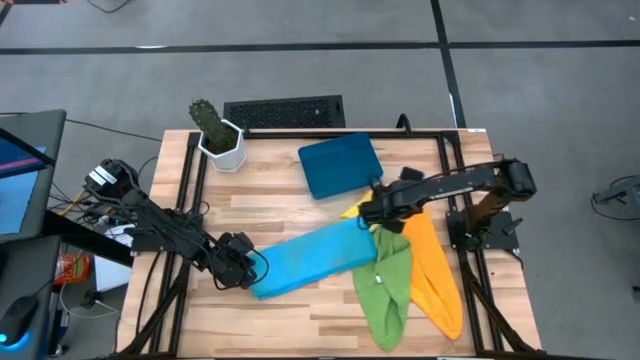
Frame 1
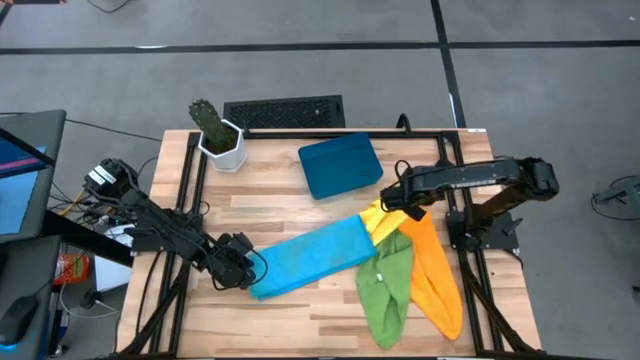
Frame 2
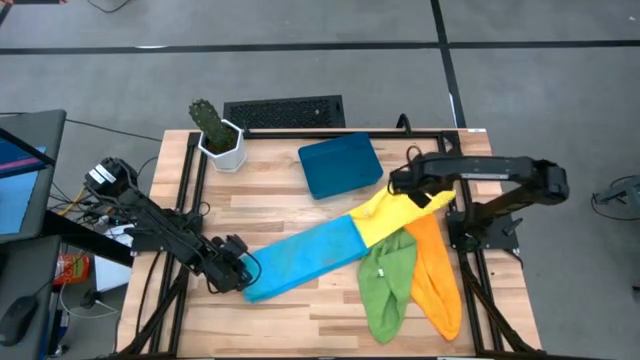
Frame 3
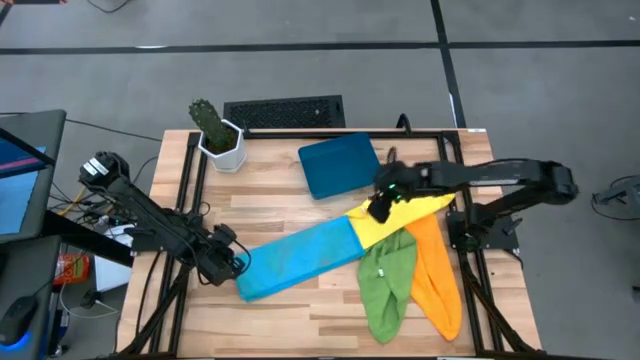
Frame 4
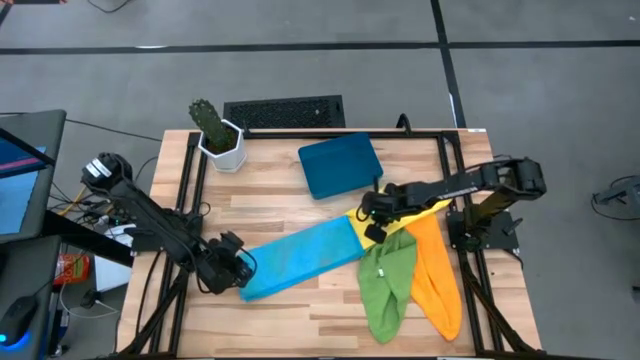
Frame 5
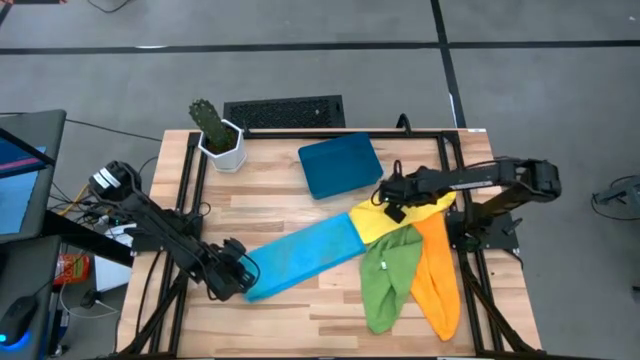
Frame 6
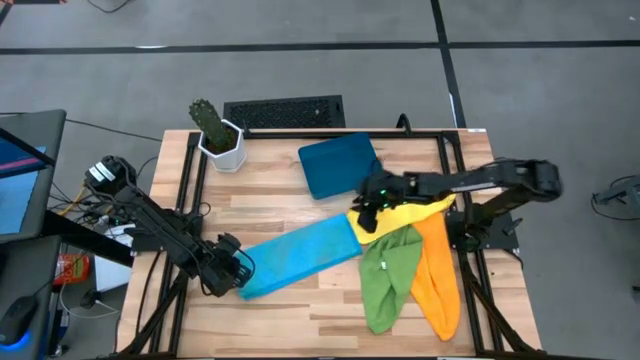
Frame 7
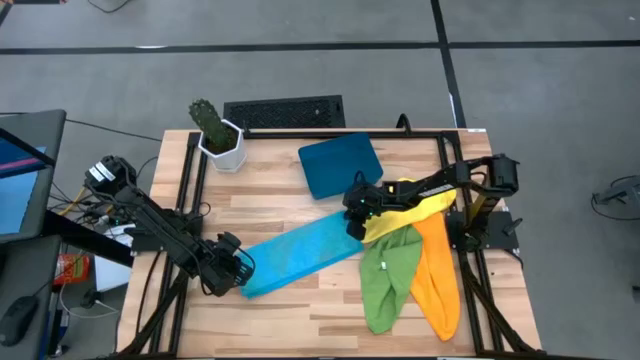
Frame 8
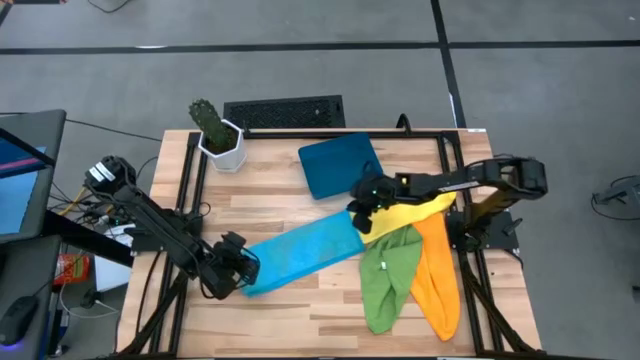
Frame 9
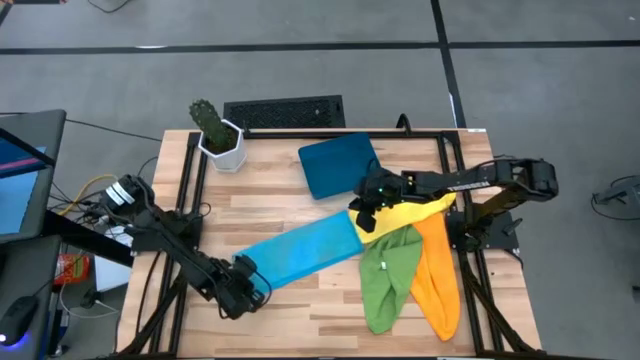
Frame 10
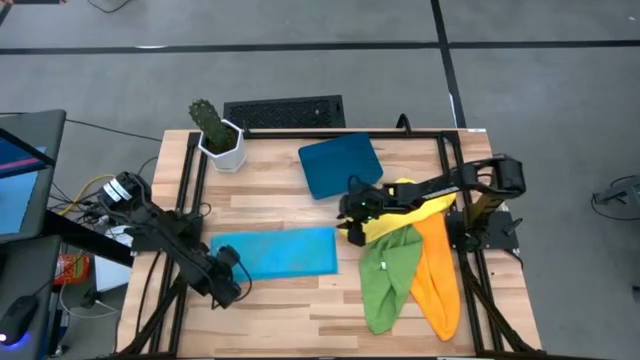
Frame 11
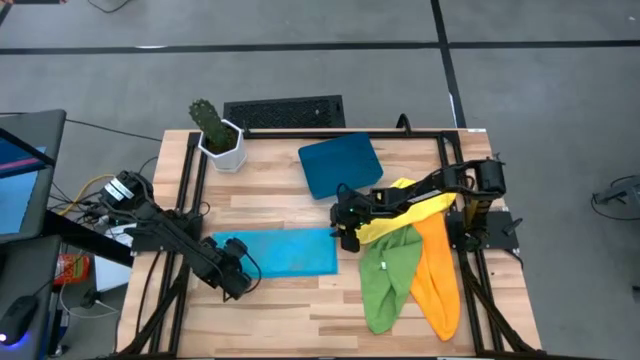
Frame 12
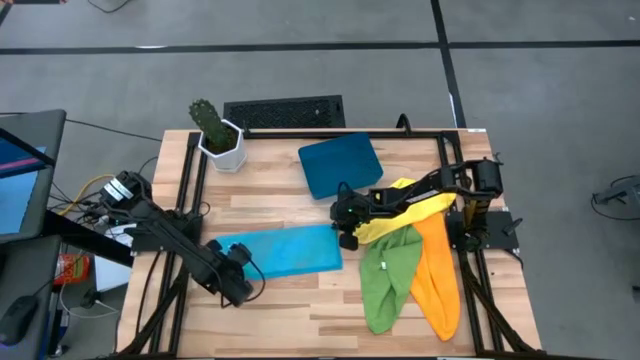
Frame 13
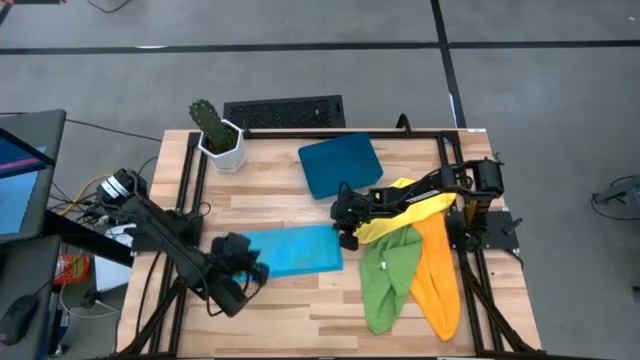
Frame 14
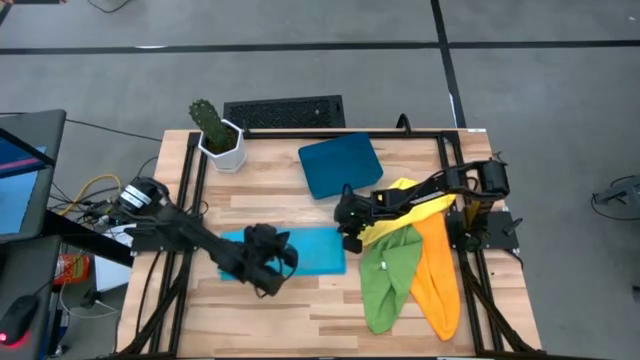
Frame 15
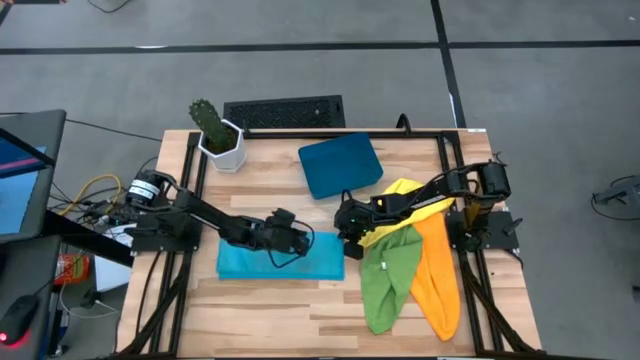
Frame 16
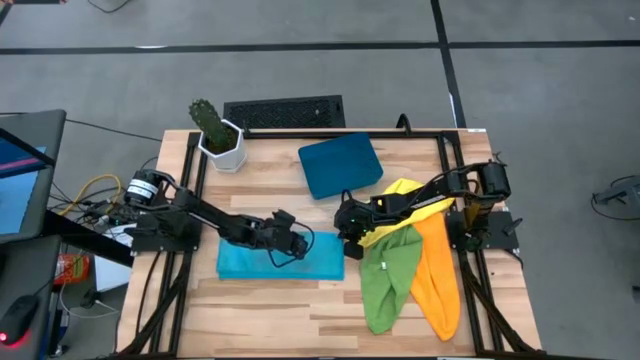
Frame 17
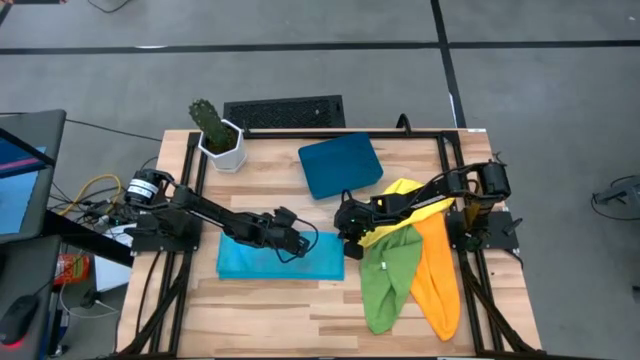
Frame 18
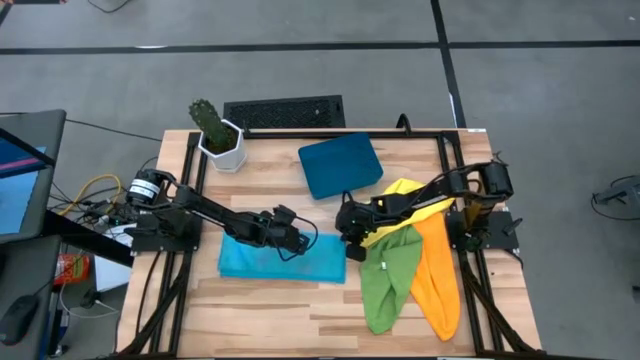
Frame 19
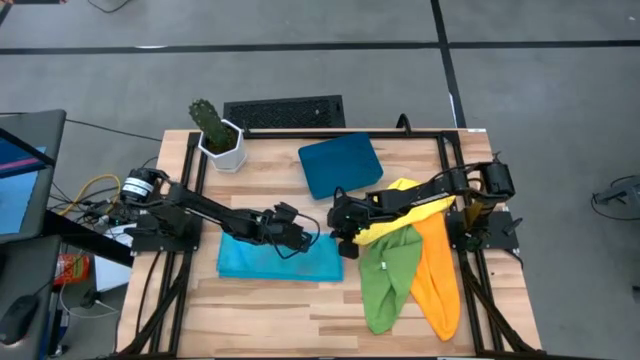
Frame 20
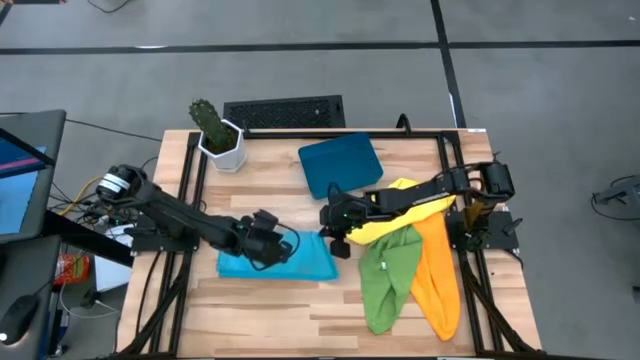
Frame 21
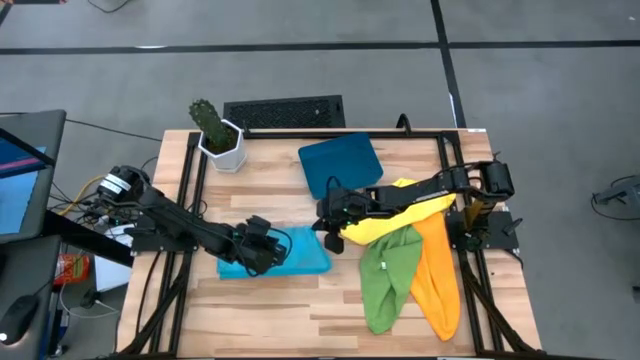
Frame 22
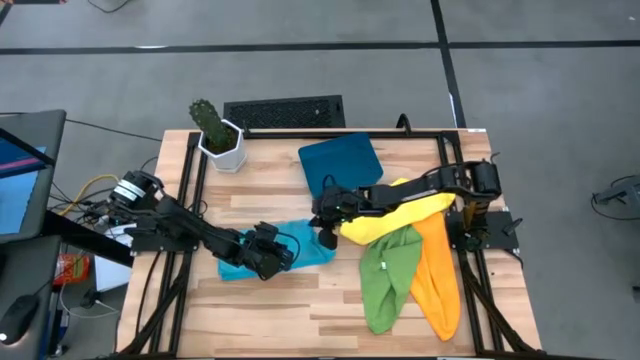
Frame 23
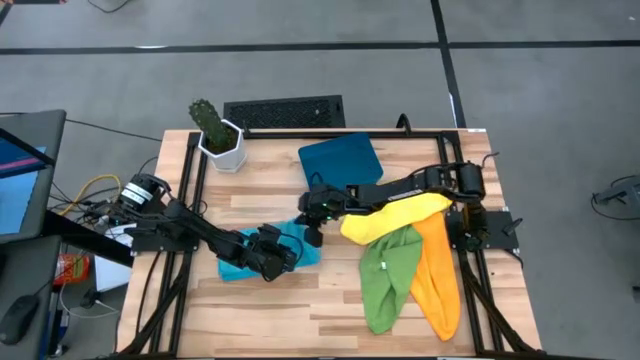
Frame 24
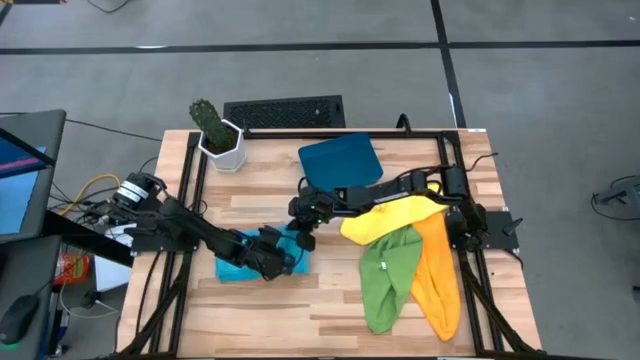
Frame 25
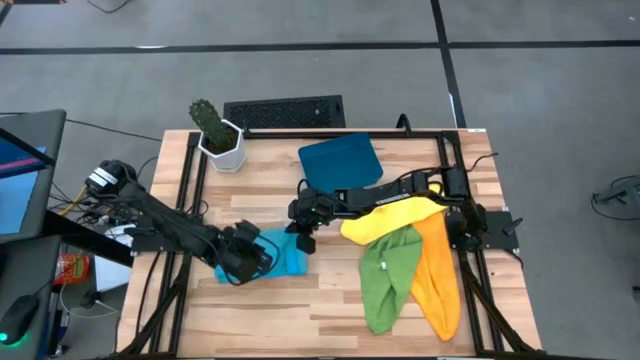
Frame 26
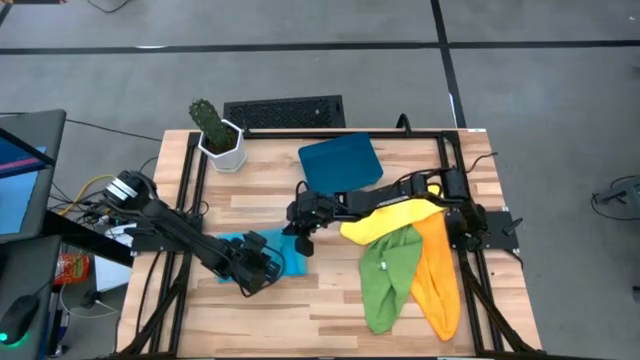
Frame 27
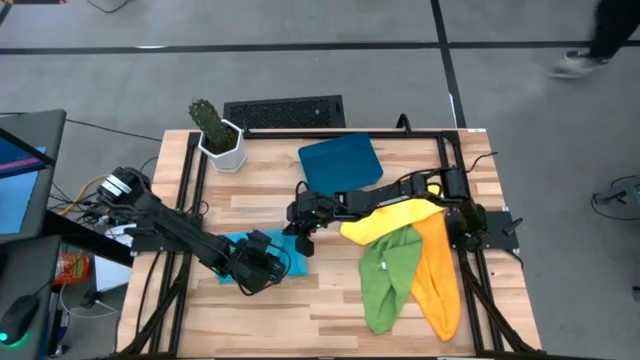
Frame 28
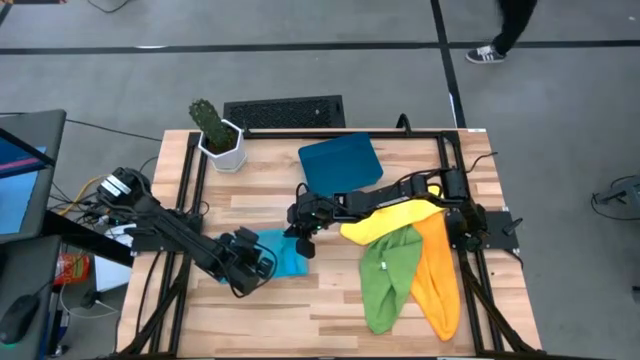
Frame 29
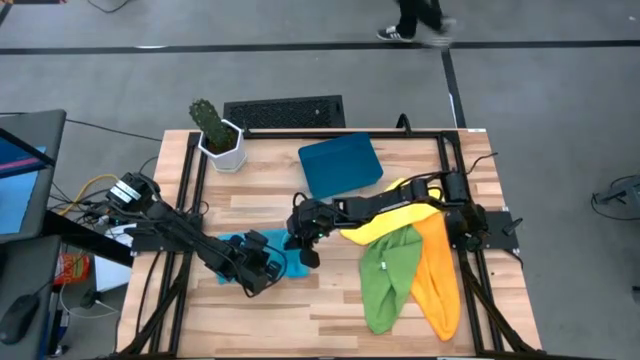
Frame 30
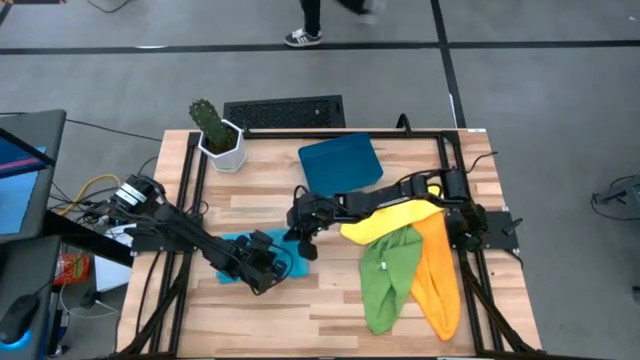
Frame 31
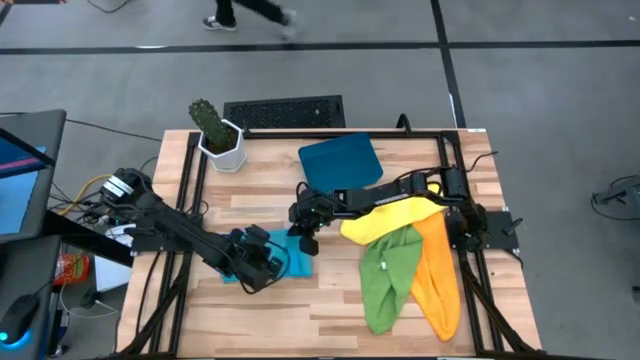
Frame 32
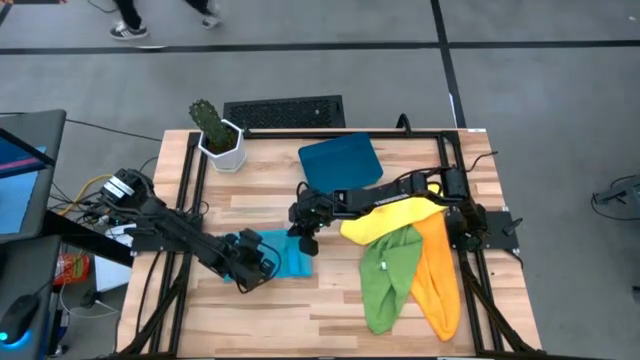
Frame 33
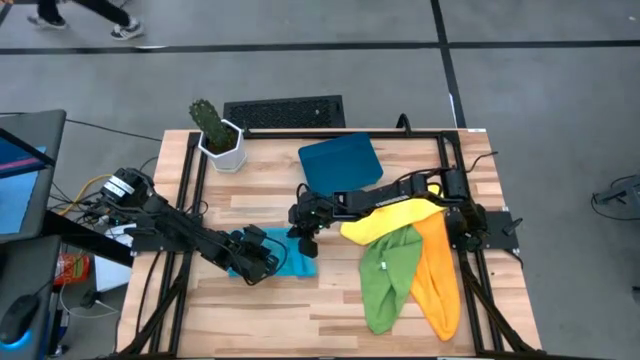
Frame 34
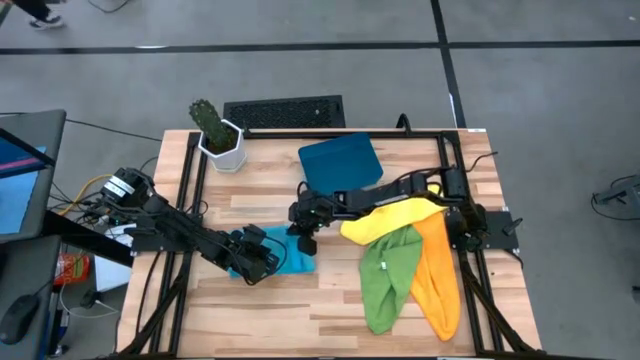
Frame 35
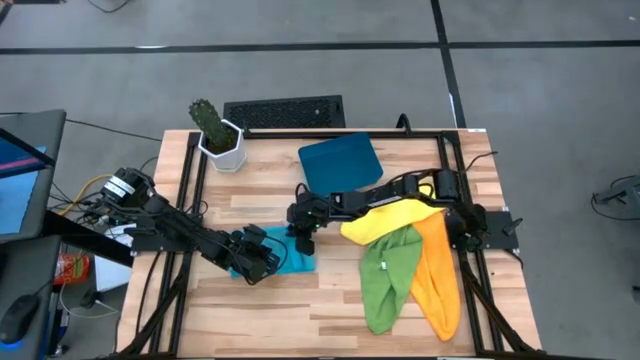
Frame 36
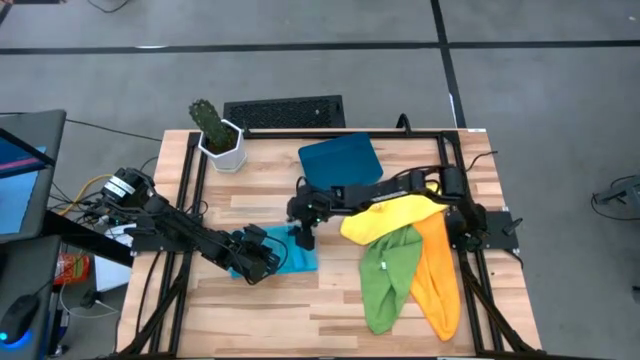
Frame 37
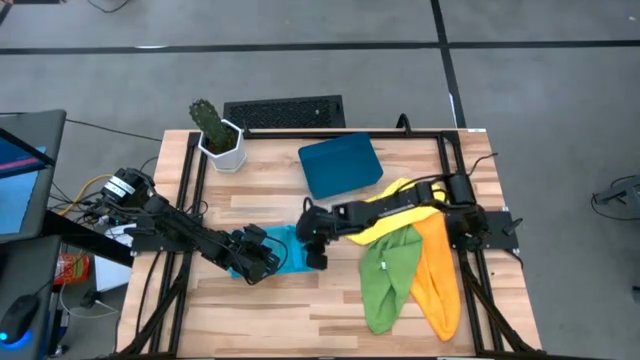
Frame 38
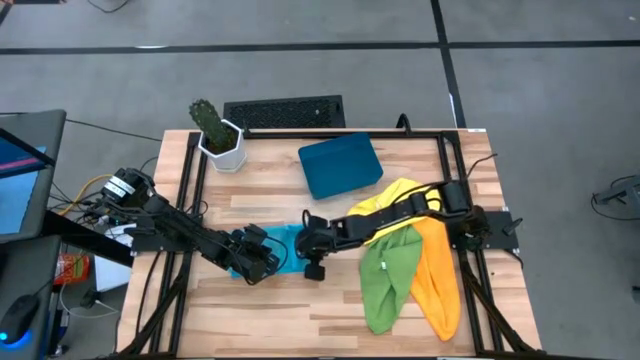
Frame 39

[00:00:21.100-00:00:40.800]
Task: Fold microfiber towels
Fold the blue microfiber cloth

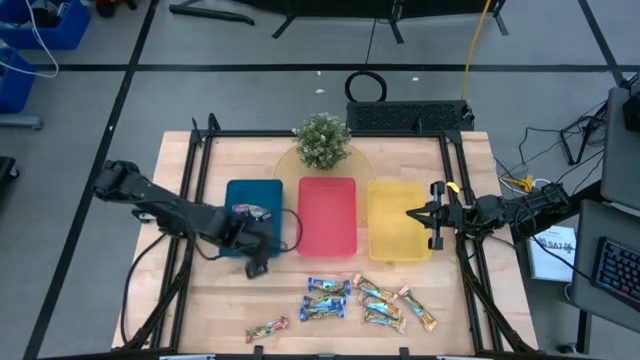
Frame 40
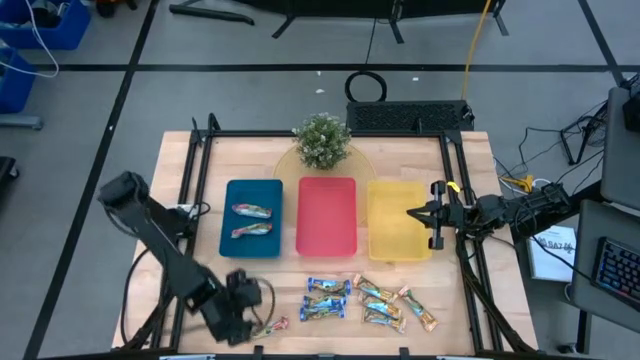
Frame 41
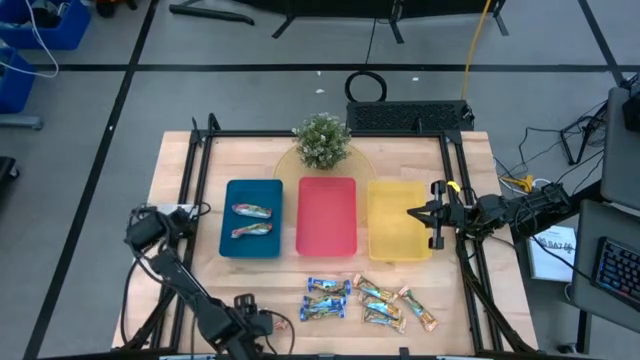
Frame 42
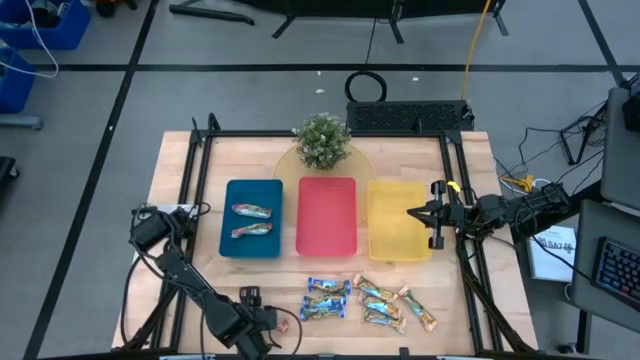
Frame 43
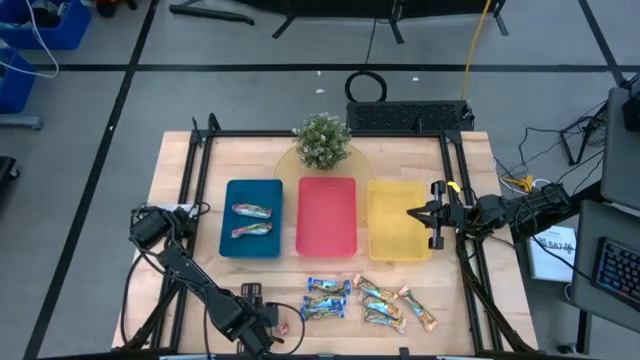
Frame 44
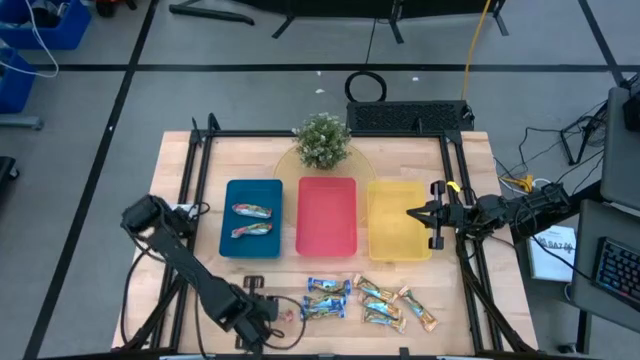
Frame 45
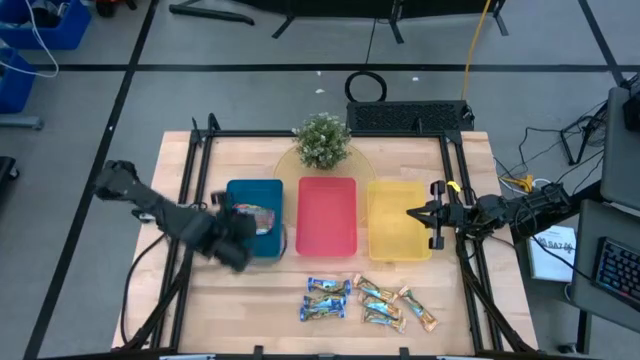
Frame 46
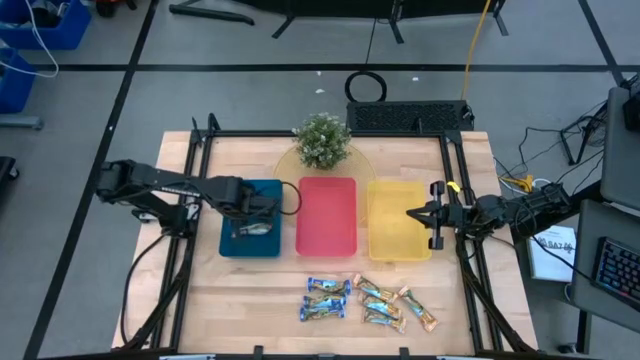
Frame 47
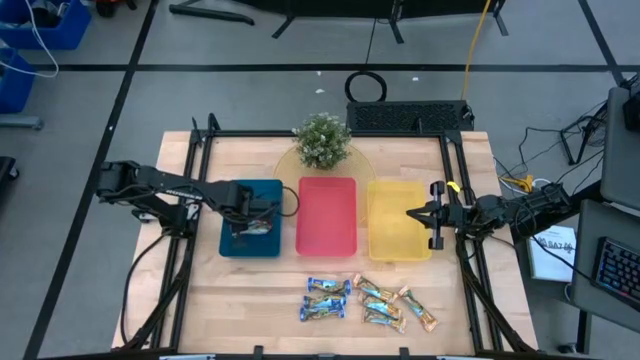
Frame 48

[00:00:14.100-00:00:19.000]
Task: Pick and place Granola Bars by type
Put the red granola bar into the blue bin
